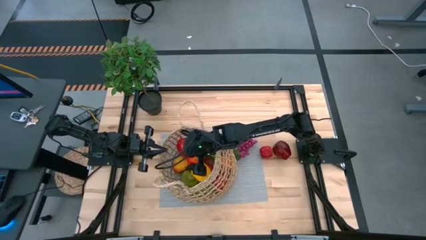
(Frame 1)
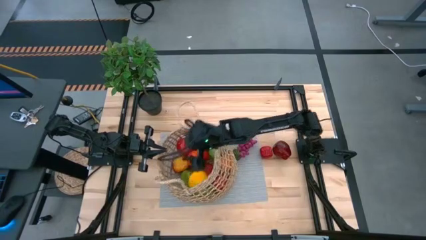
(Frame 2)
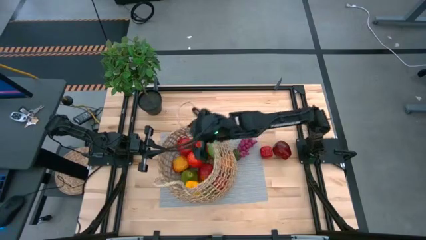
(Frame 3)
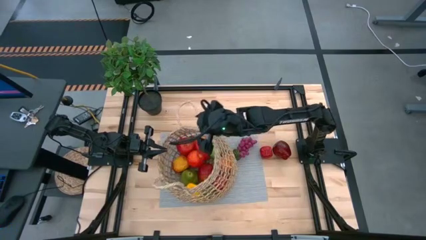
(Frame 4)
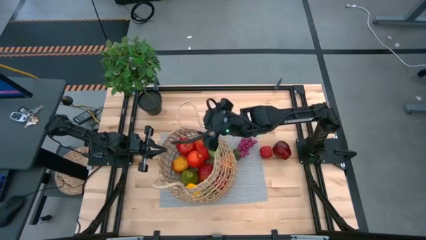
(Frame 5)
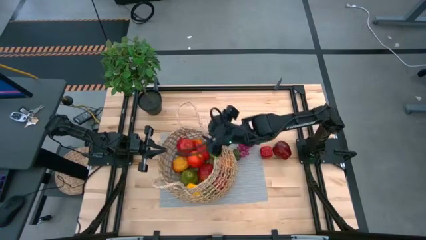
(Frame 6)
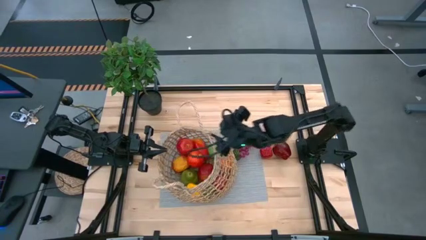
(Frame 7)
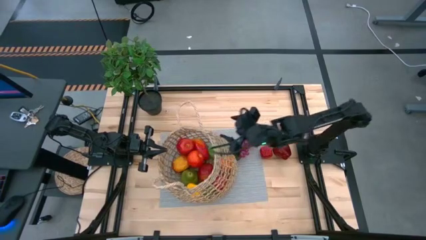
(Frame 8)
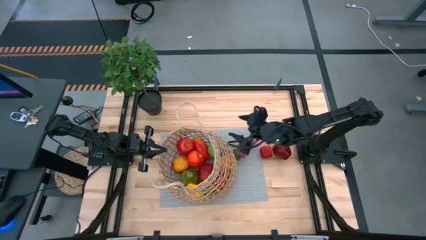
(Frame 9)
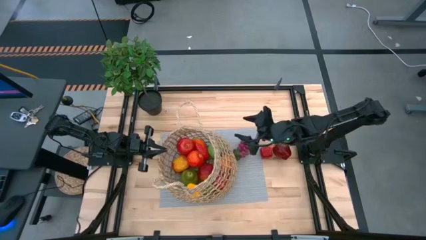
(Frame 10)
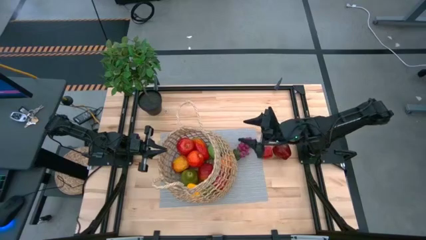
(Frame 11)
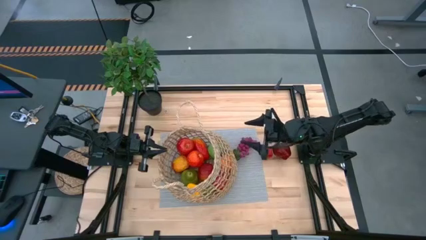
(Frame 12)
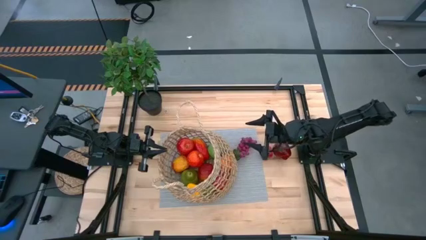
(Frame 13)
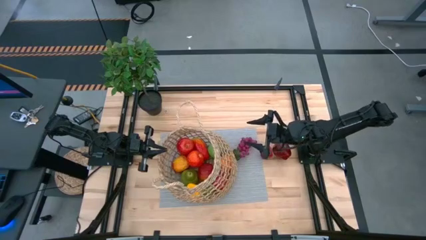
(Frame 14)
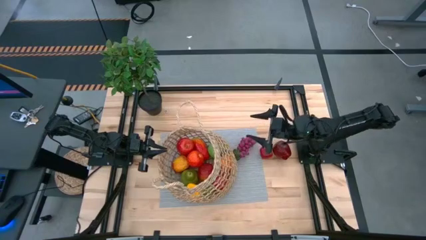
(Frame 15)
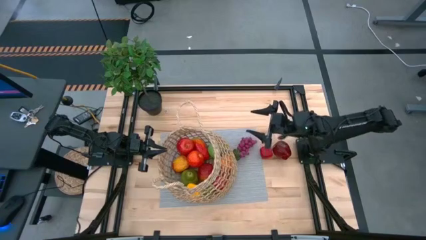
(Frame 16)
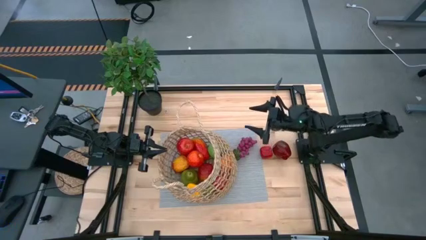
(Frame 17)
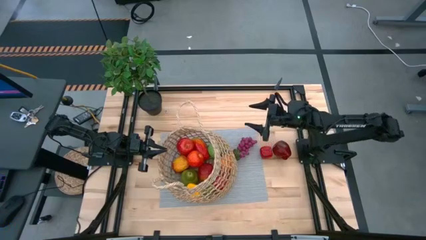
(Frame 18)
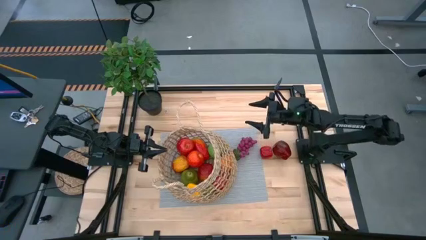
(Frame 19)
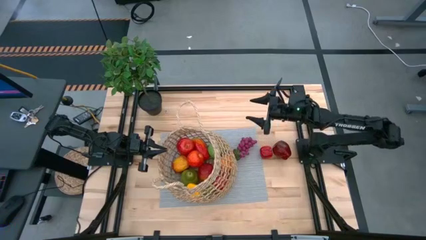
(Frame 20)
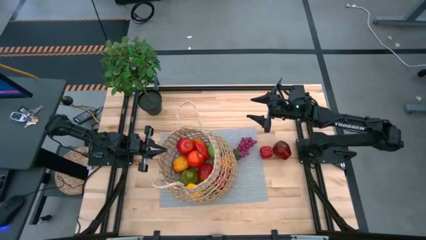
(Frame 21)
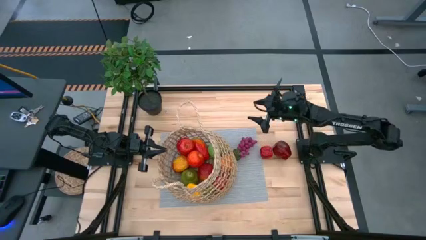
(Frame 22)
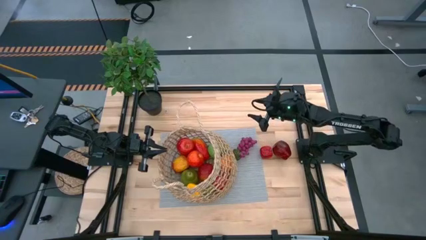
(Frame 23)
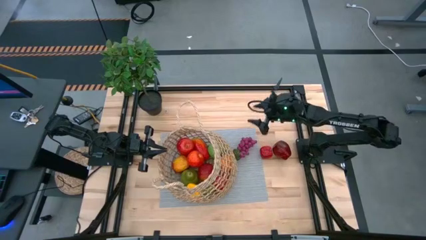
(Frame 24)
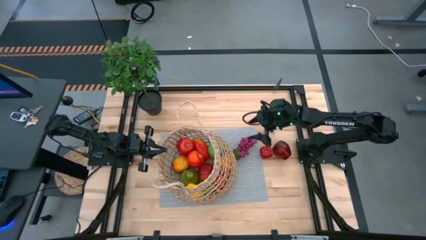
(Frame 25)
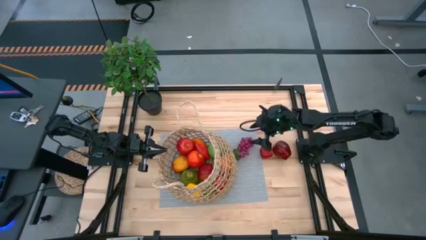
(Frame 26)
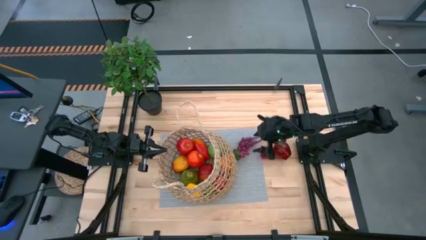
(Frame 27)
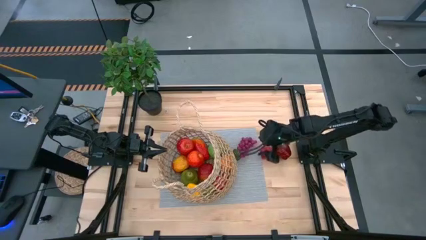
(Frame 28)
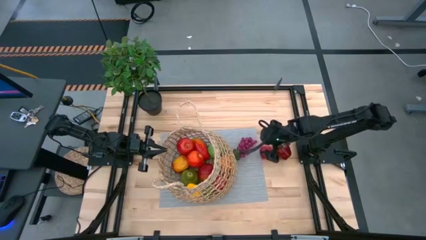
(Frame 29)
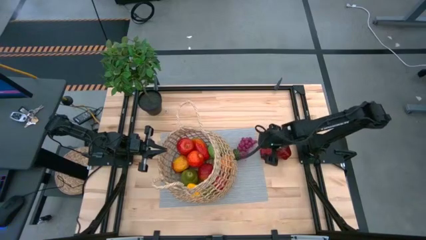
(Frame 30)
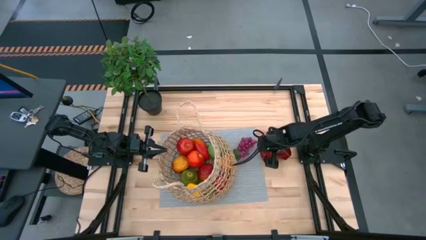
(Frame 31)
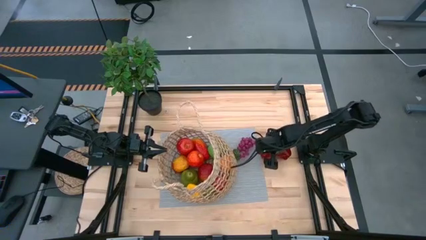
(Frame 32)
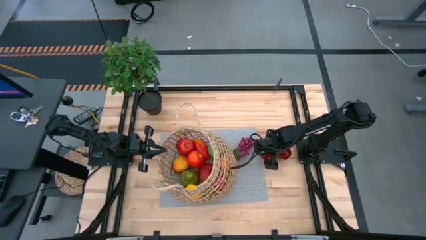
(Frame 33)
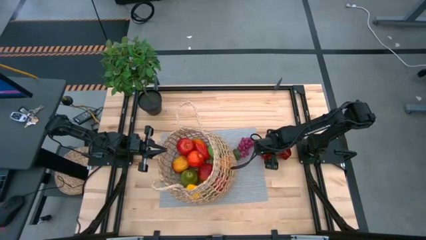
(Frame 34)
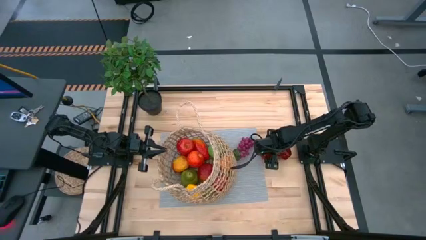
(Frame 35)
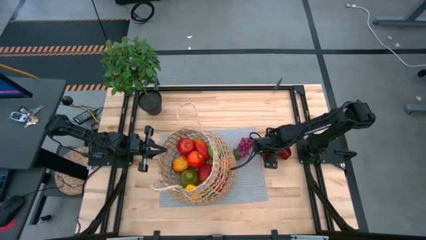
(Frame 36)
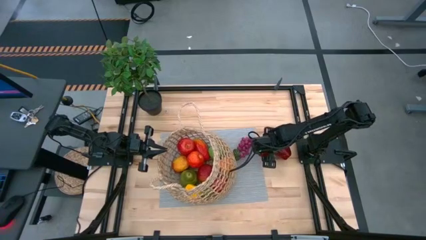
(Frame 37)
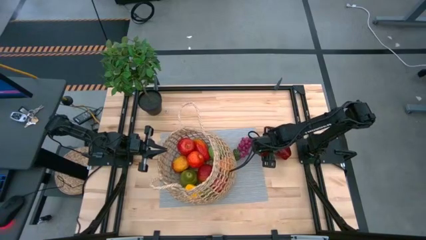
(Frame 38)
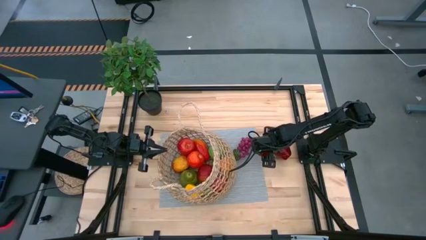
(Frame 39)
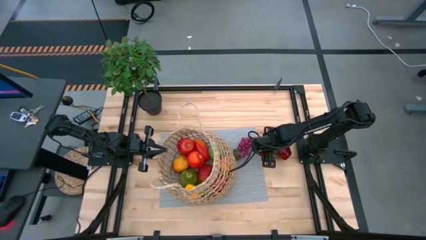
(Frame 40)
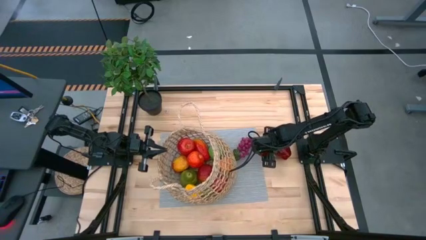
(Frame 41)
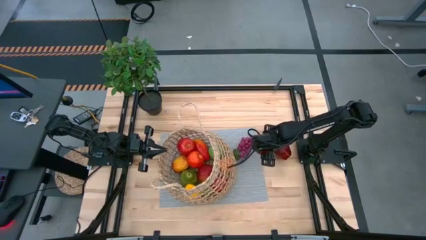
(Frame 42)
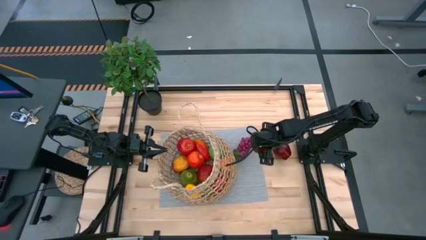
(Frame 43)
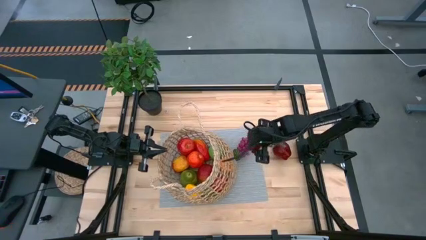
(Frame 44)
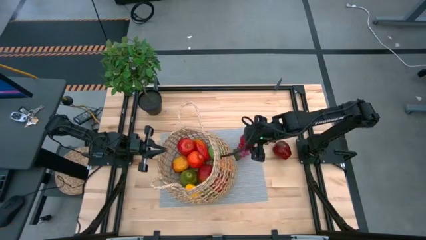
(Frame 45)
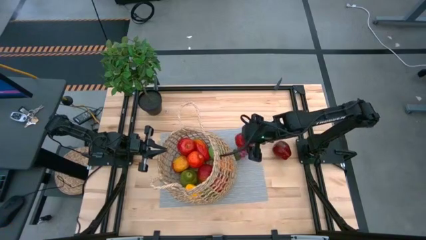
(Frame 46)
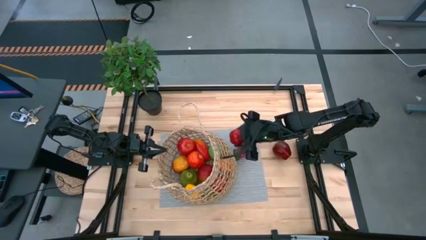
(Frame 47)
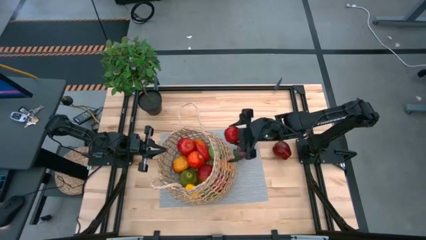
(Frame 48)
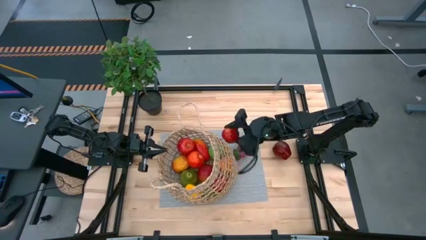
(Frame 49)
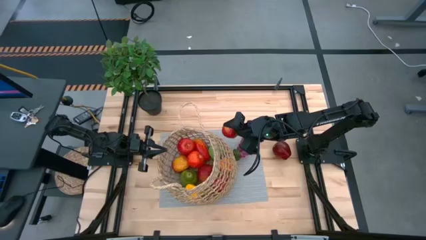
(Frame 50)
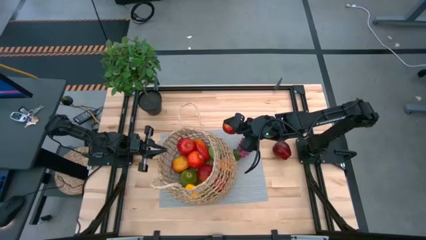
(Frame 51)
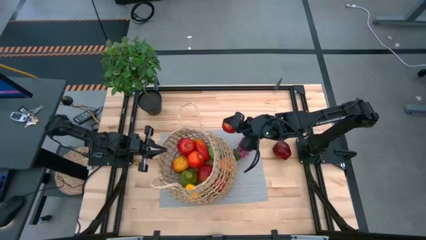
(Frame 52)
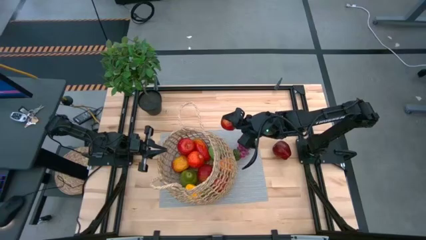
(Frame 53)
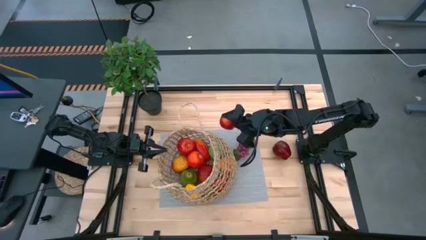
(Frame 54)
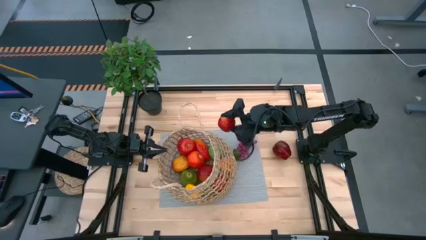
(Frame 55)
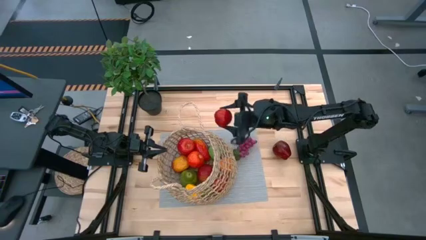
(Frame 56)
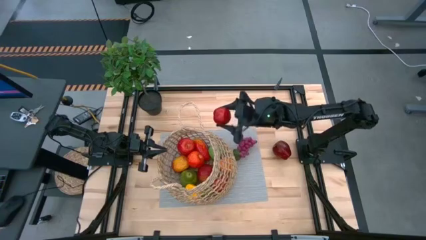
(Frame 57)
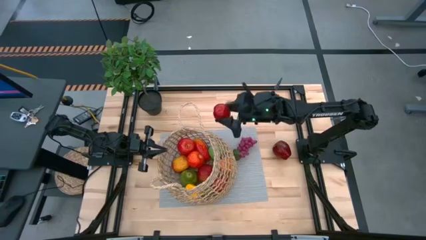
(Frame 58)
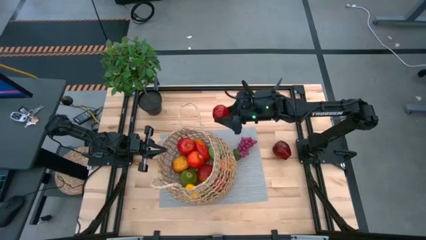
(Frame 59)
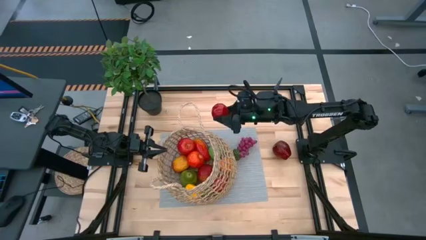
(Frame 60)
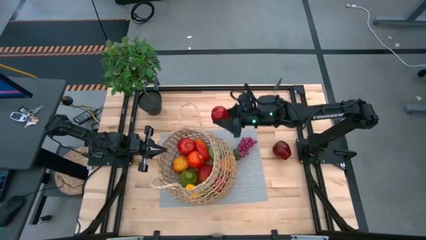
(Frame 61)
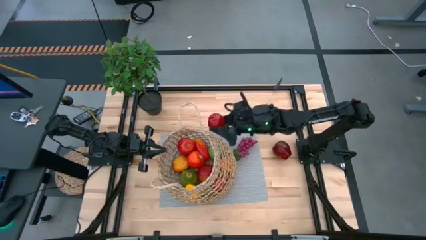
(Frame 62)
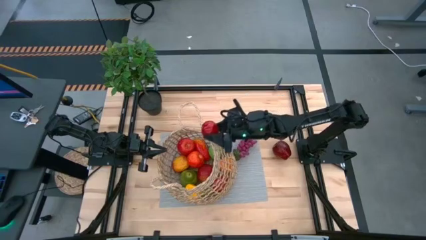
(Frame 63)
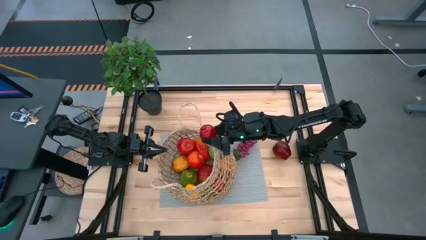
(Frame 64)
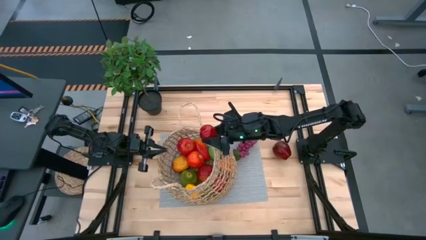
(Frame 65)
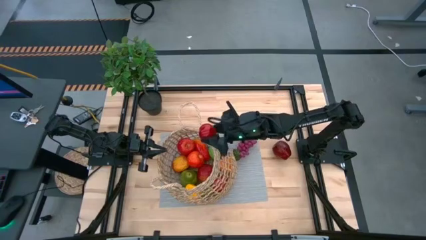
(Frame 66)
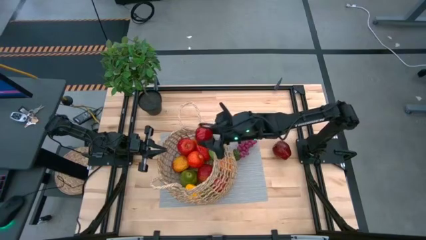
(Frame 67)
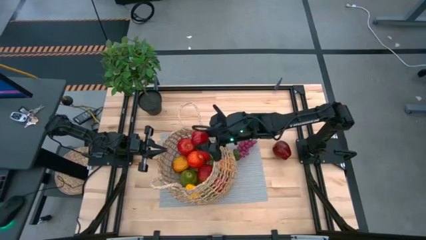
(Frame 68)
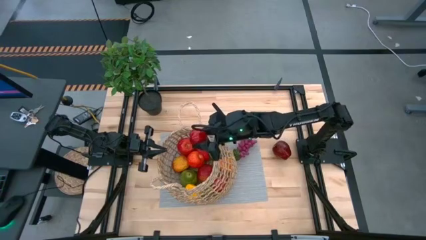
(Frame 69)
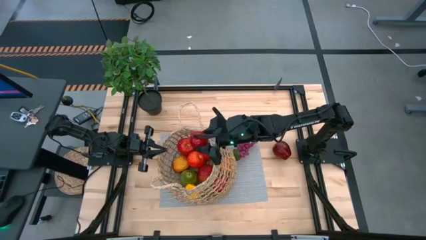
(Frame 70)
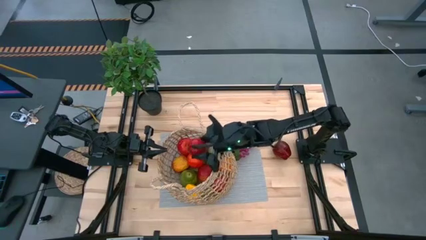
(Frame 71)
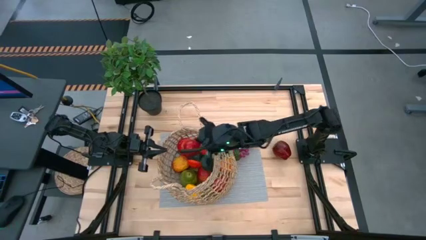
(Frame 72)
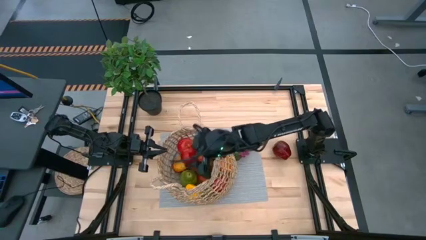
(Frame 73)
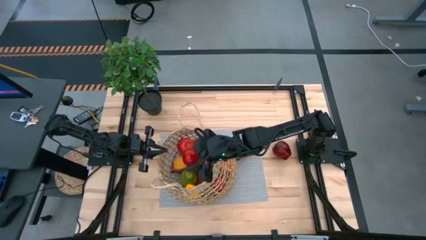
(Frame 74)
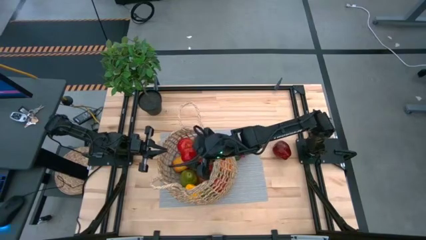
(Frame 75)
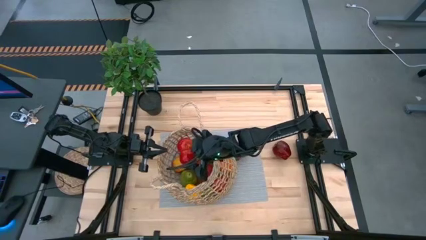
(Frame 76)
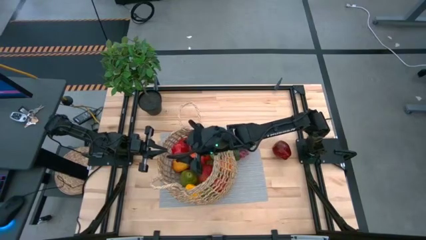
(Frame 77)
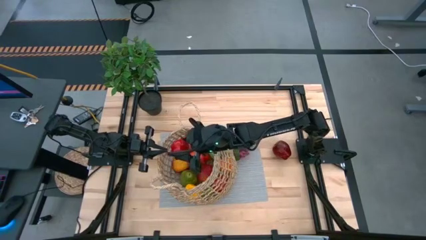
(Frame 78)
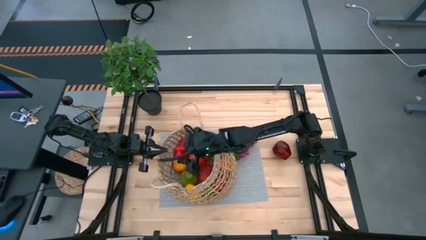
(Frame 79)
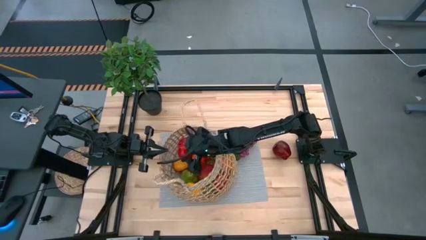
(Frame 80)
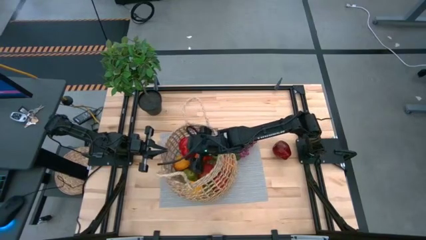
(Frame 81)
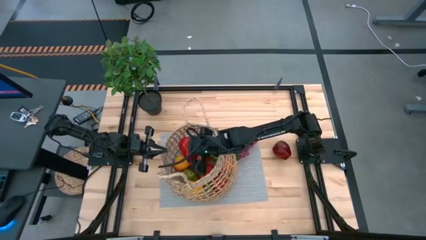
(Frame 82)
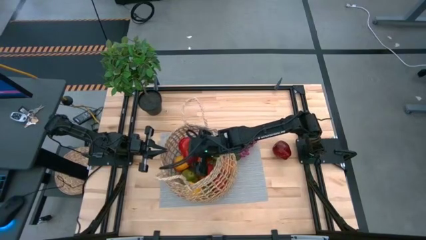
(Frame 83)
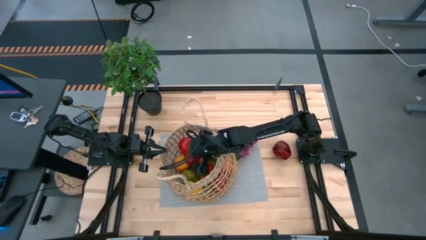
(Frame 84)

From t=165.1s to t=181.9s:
Task: Build produce basket
Put the red apple into the brown basket
